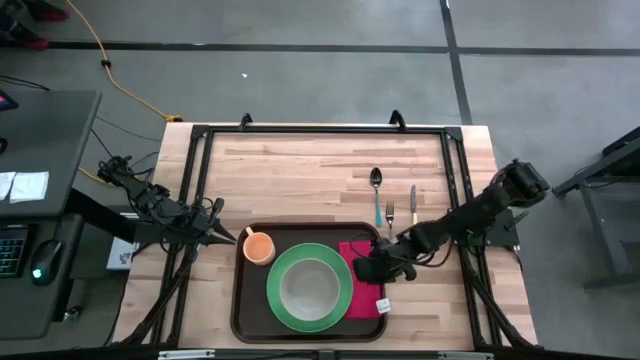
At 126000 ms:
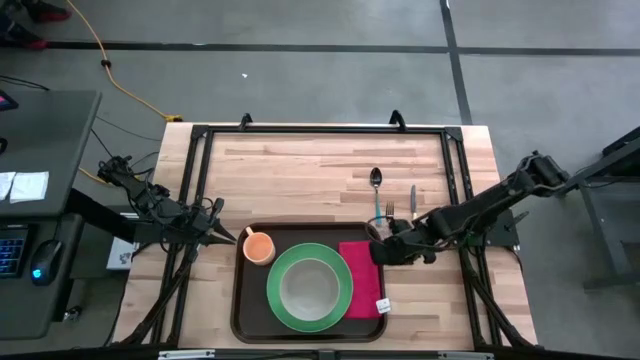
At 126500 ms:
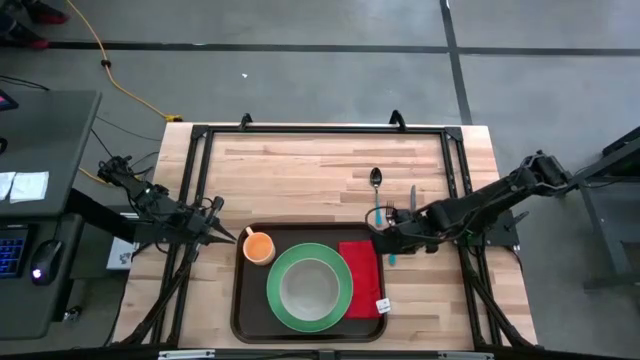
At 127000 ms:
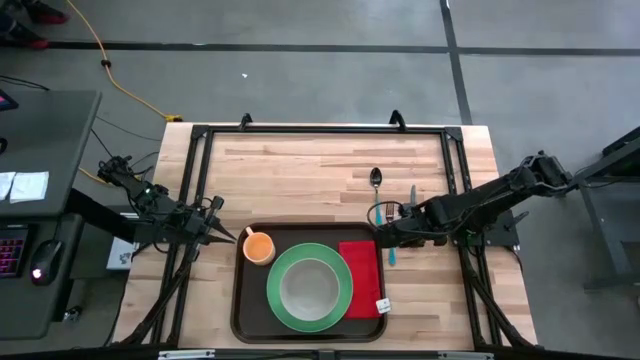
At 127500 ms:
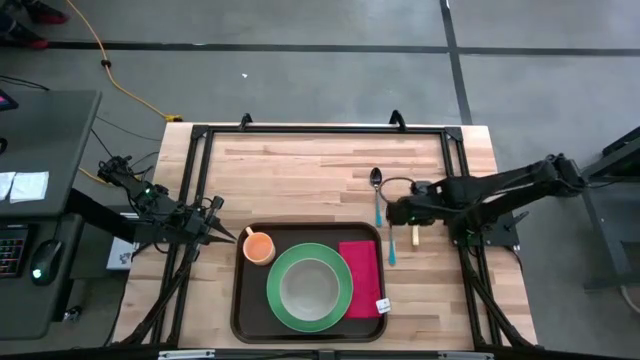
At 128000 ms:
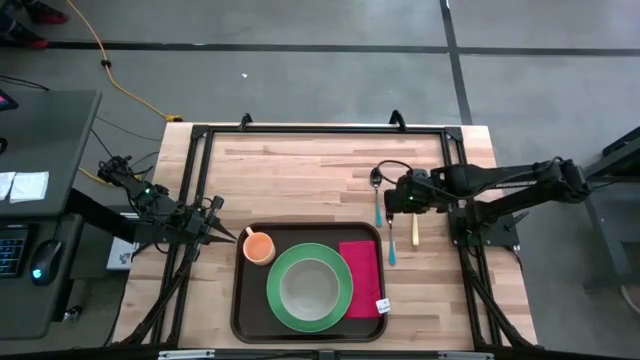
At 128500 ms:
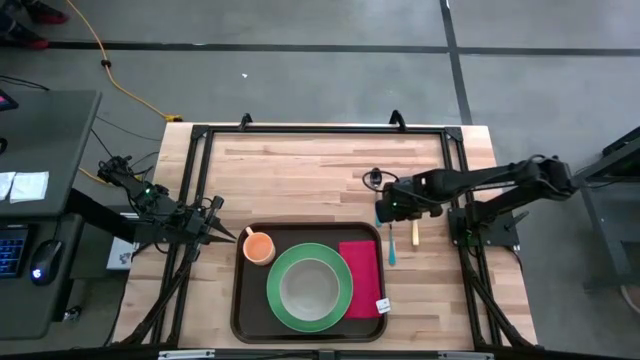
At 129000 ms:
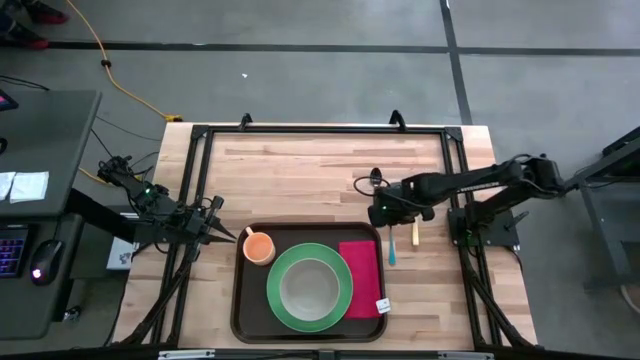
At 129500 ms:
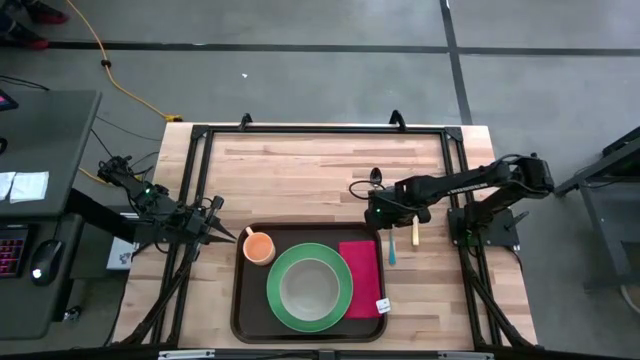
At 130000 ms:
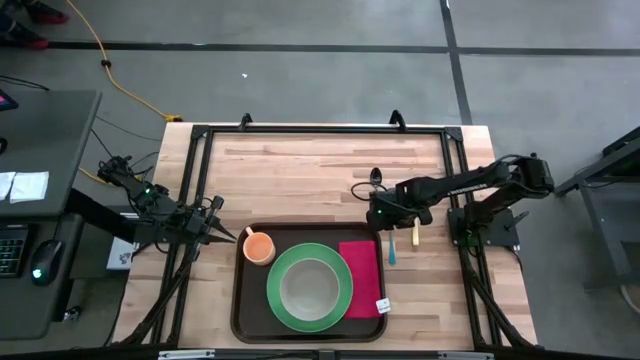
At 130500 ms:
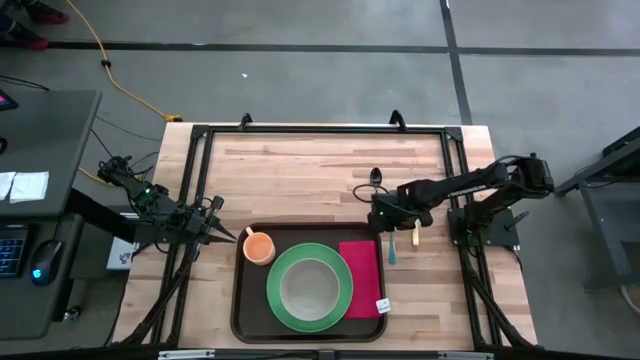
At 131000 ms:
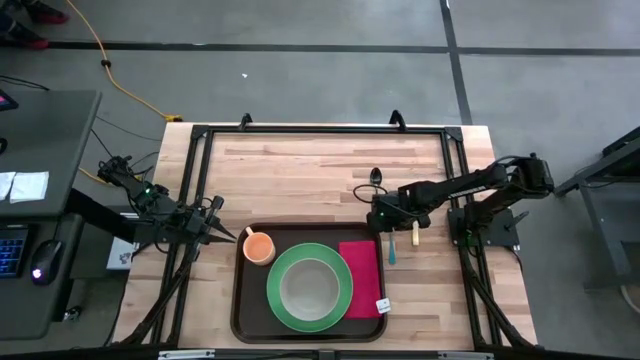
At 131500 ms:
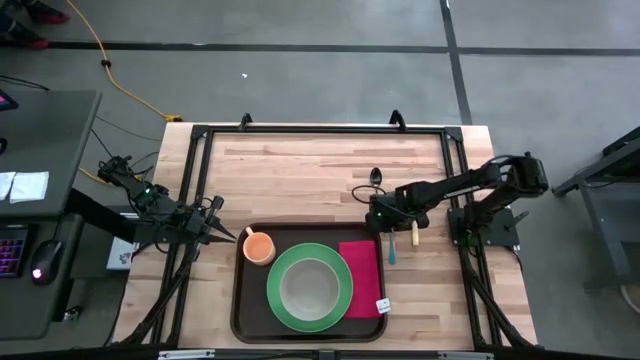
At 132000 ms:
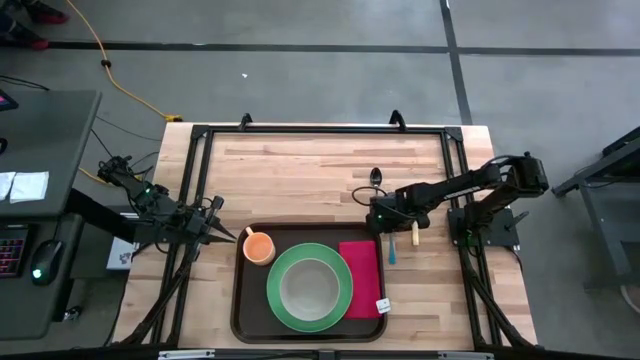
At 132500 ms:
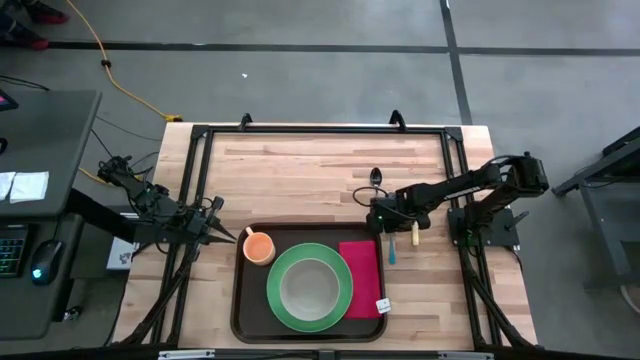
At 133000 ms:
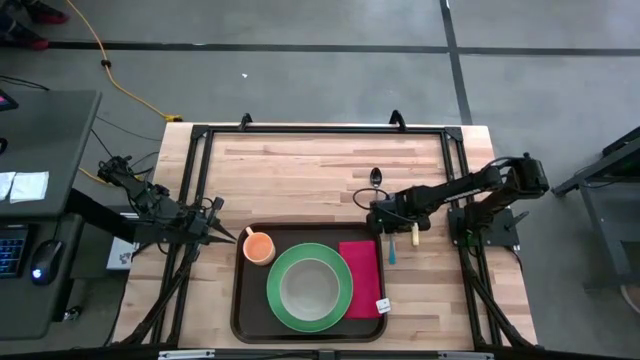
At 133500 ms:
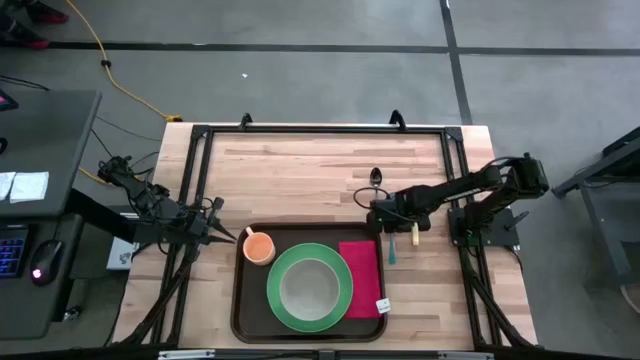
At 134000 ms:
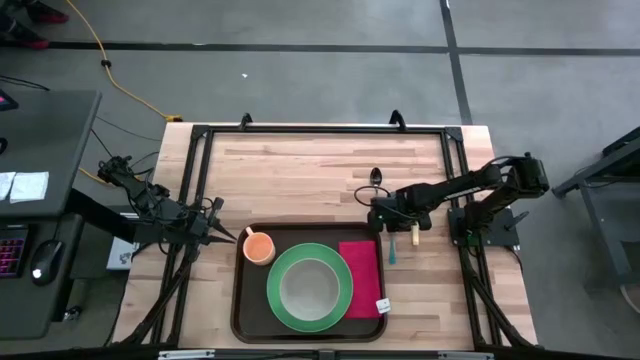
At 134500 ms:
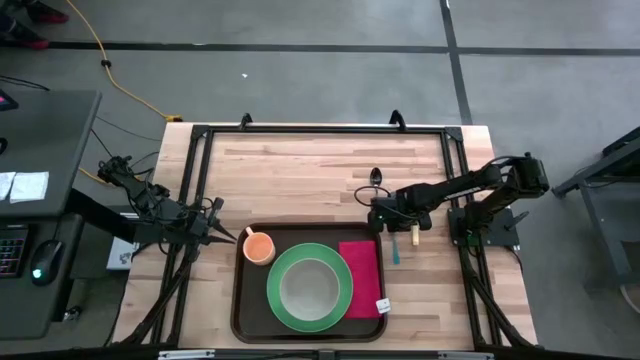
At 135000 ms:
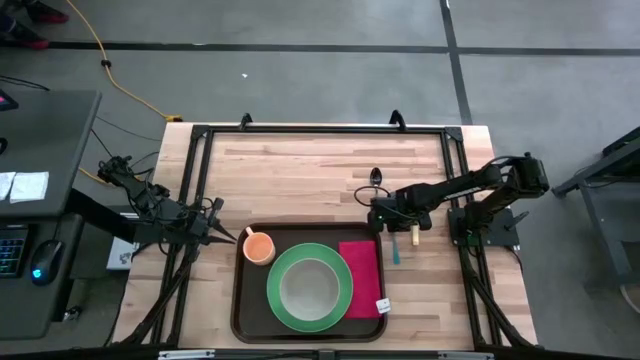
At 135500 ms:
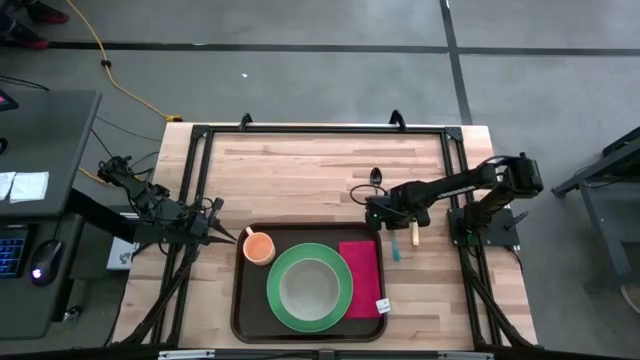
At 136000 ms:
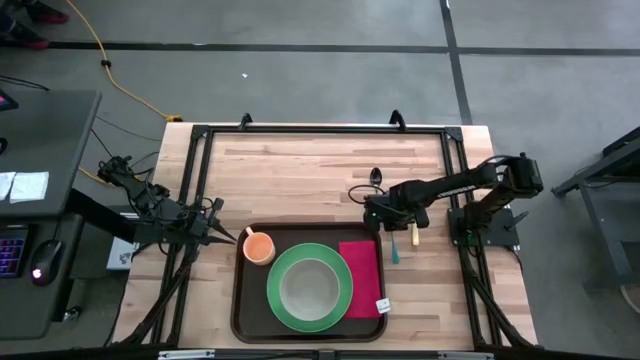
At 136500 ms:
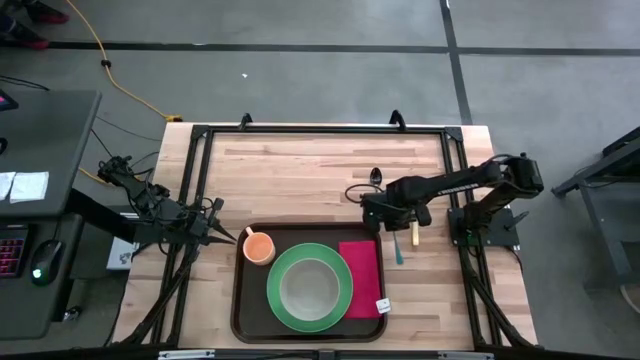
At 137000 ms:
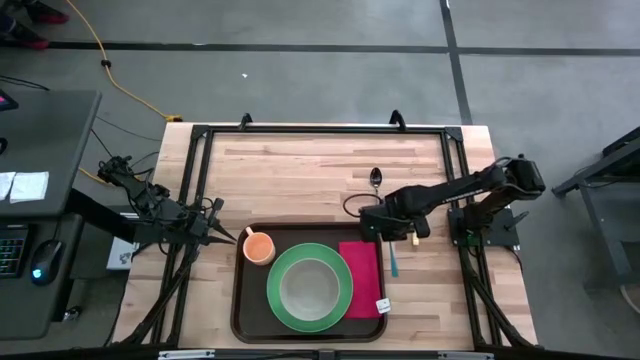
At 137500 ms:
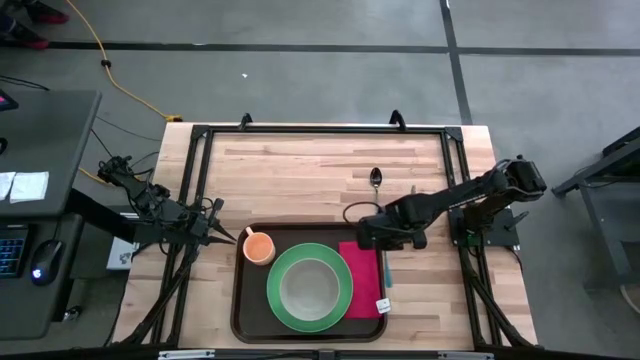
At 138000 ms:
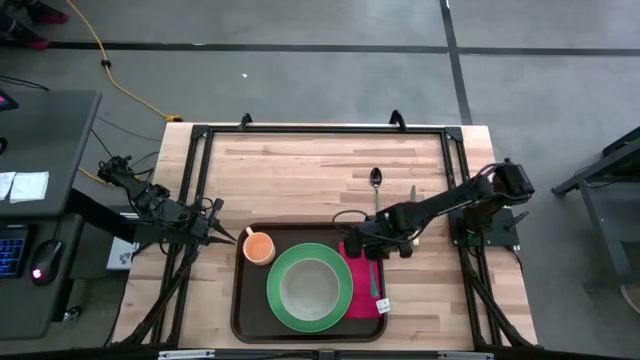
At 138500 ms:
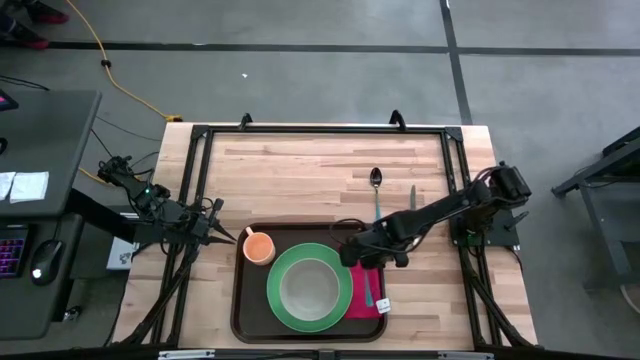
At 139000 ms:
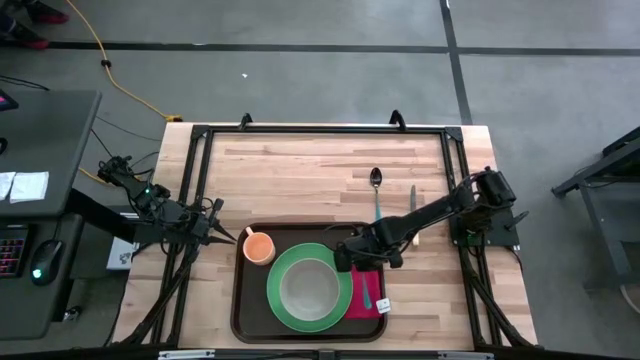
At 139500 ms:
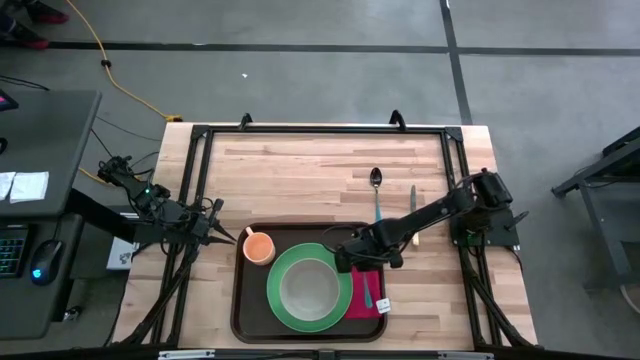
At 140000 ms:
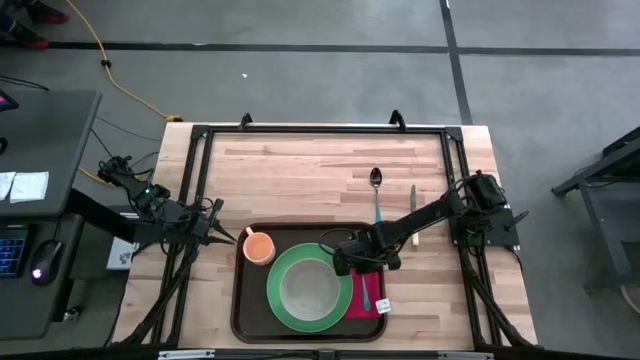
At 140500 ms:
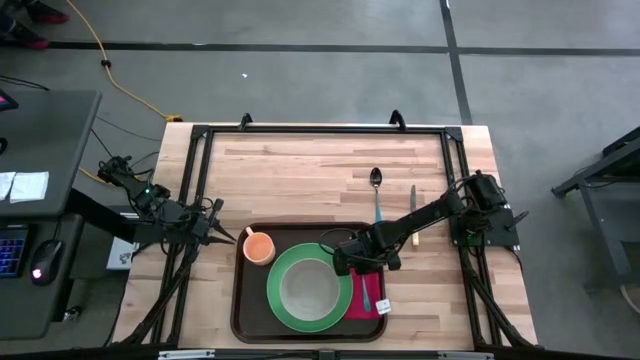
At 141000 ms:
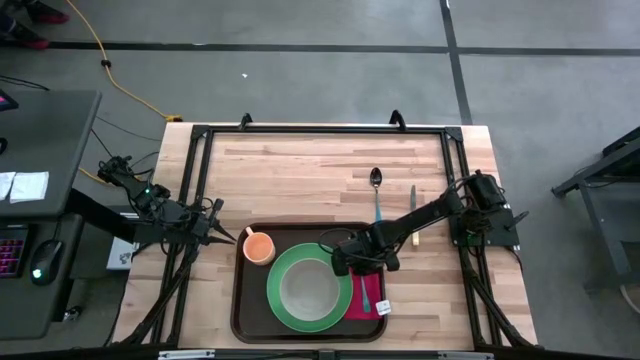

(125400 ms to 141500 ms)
Task: Set up tray
Put the blue fork on the top of the table napkin to the right of the green plate on the brown serving tray

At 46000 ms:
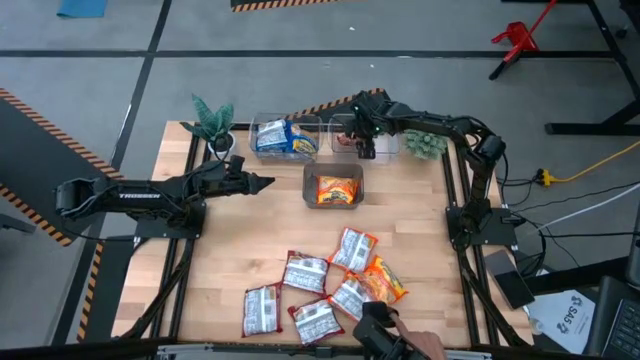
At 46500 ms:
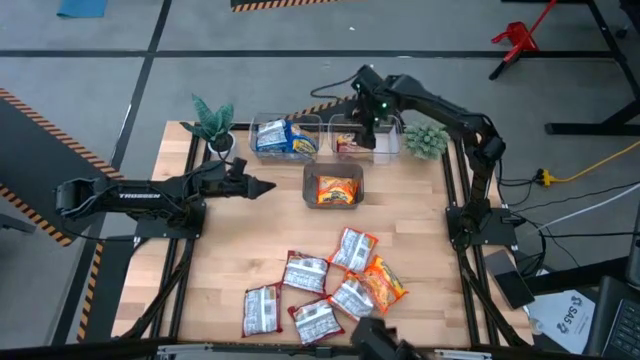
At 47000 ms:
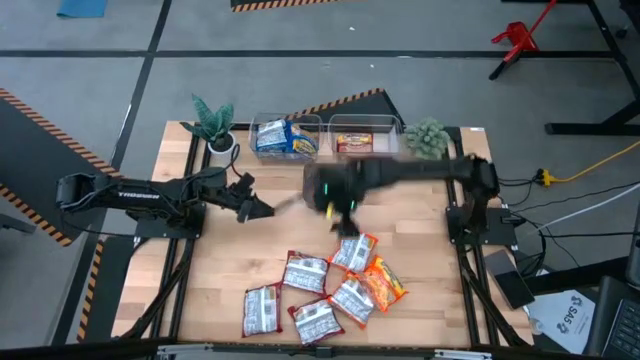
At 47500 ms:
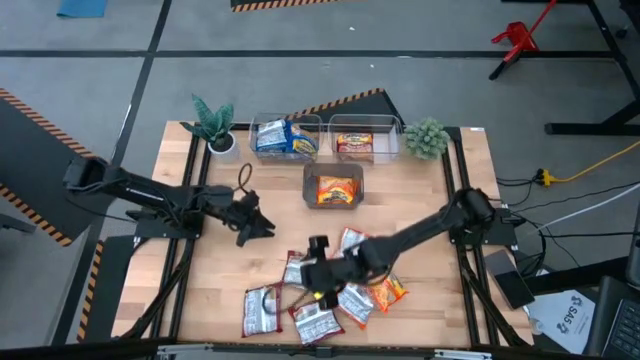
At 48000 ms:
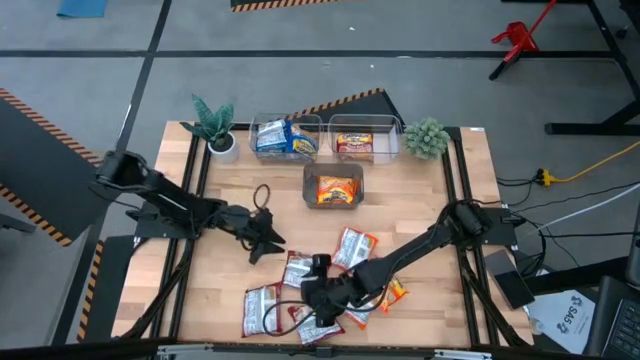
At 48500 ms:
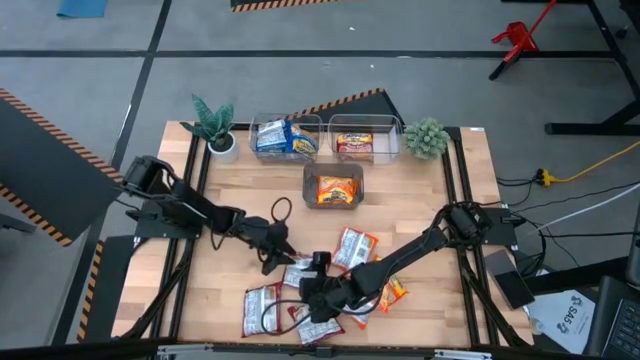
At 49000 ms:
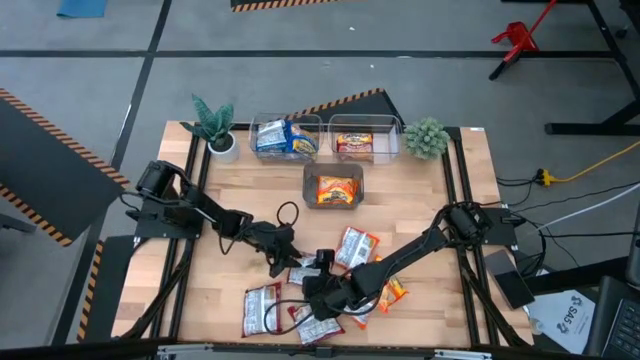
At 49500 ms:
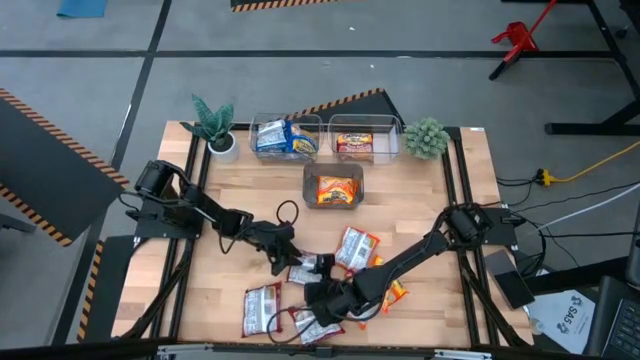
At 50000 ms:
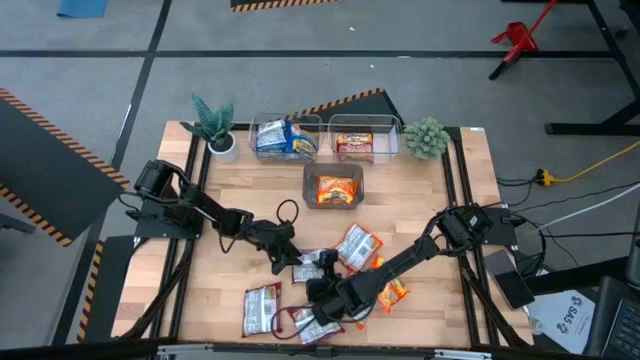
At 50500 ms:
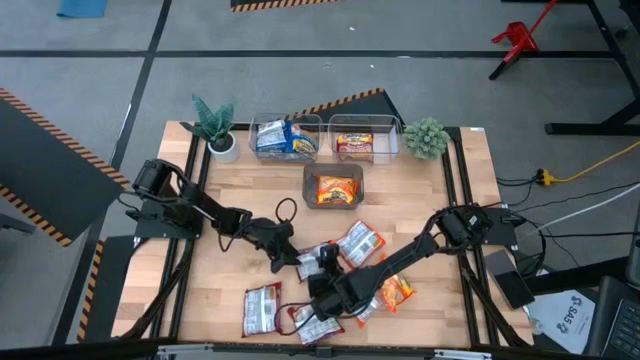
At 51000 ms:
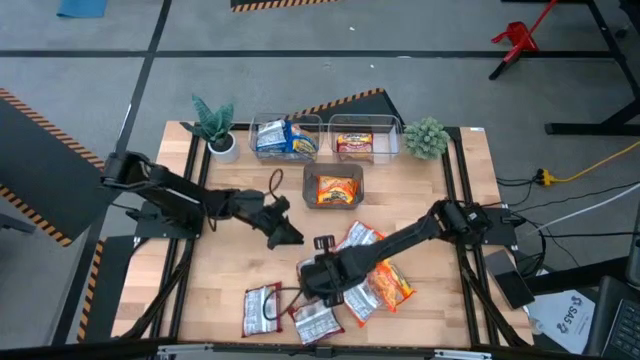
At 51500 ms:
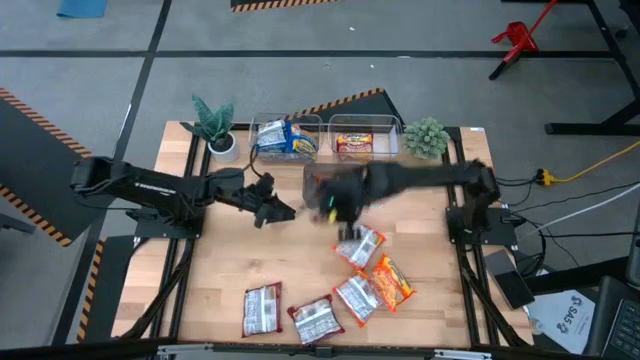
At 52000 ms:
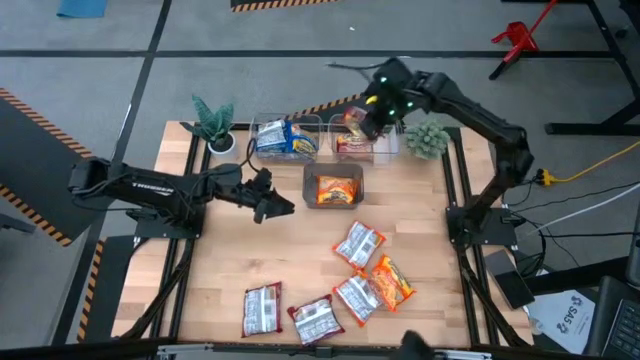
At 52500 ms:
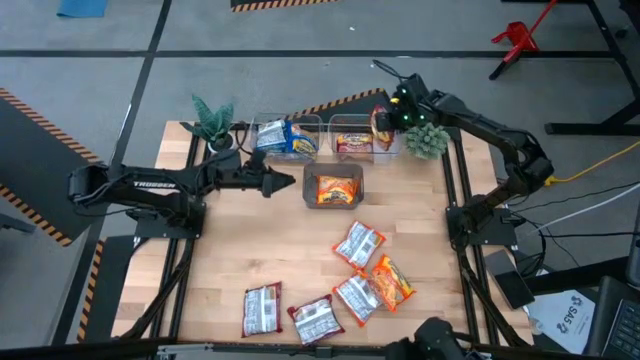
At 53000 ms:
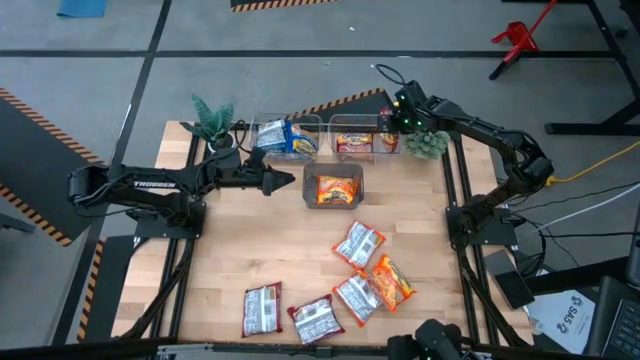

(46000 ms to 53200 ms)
Task: Sort Maruchan noodles
Put the red noodle pack into the right transparent bin
